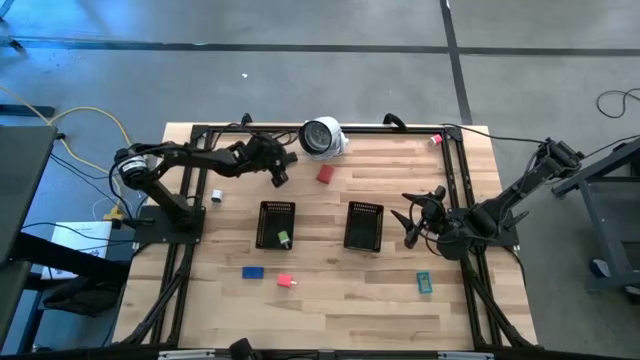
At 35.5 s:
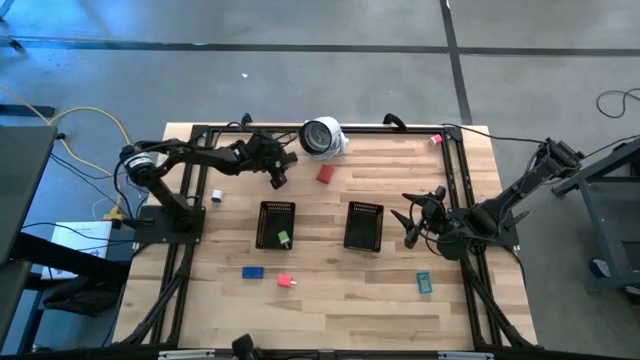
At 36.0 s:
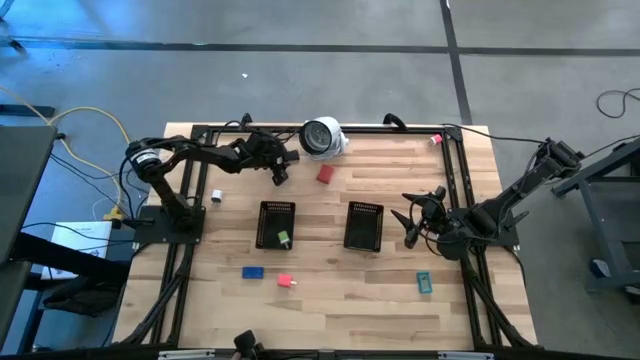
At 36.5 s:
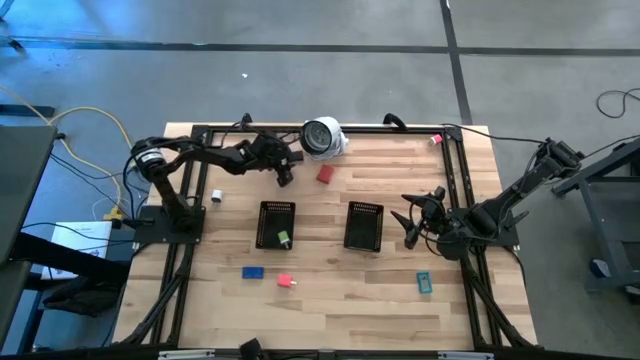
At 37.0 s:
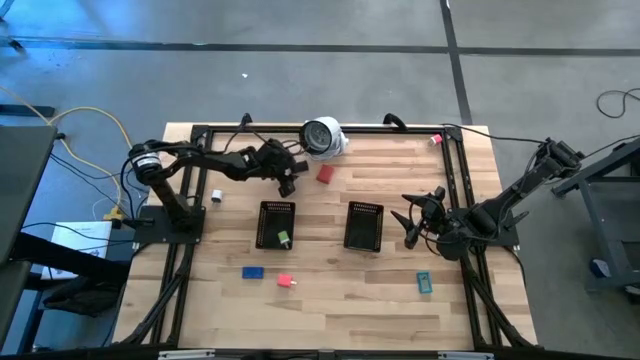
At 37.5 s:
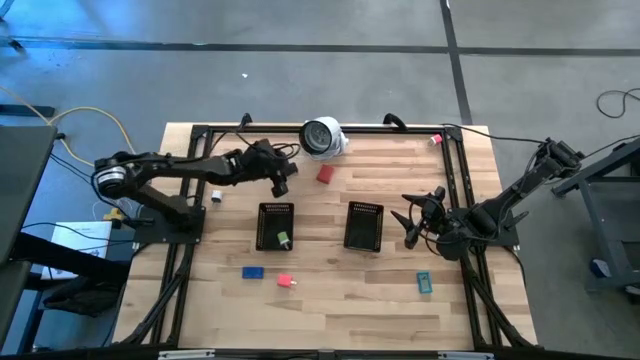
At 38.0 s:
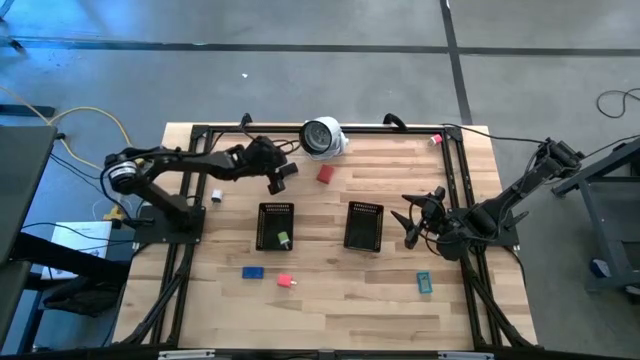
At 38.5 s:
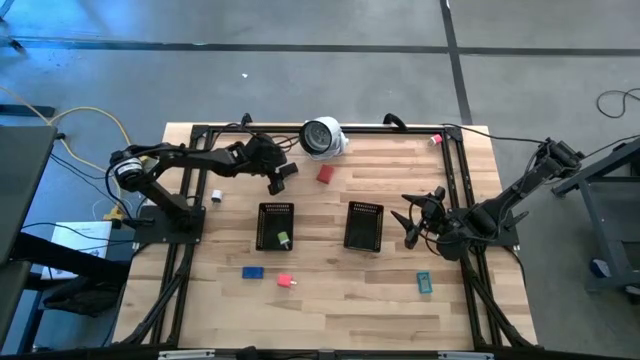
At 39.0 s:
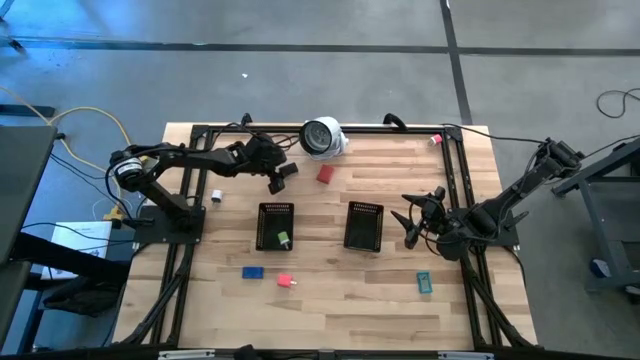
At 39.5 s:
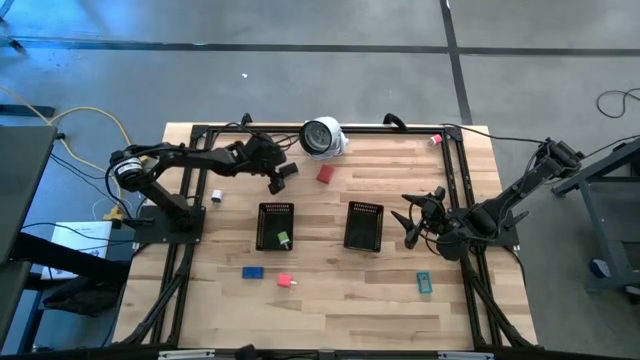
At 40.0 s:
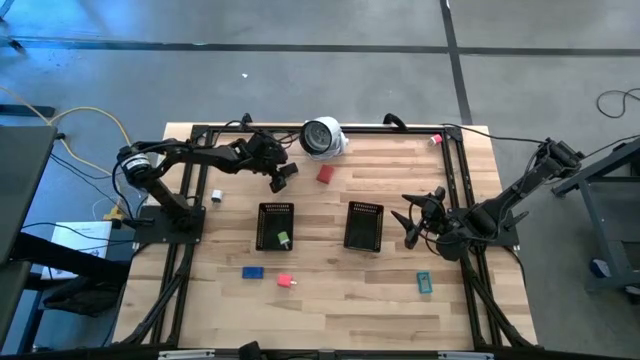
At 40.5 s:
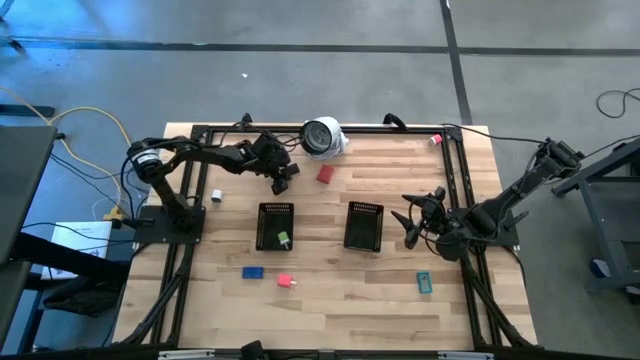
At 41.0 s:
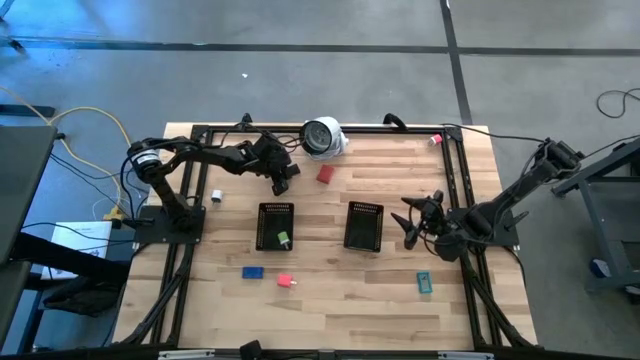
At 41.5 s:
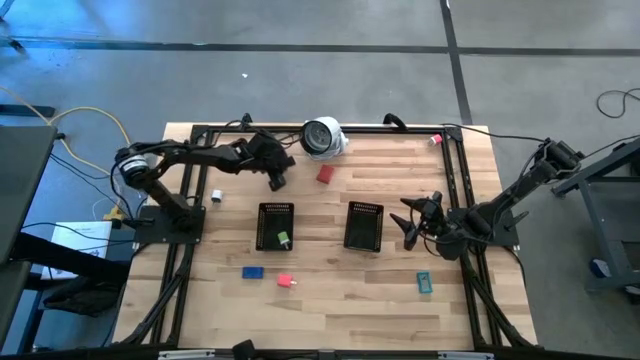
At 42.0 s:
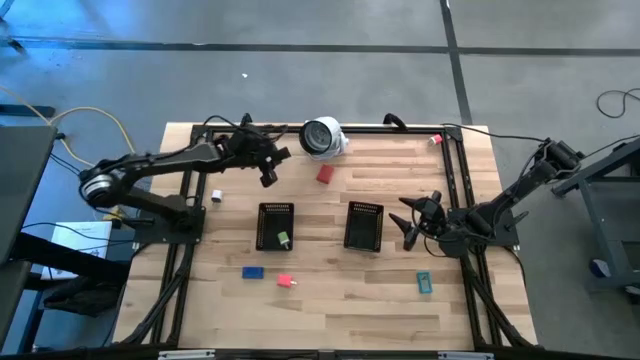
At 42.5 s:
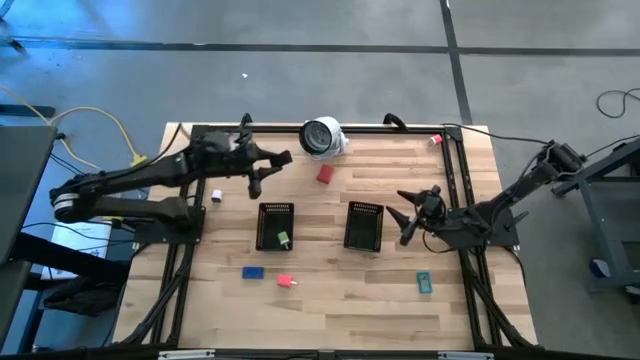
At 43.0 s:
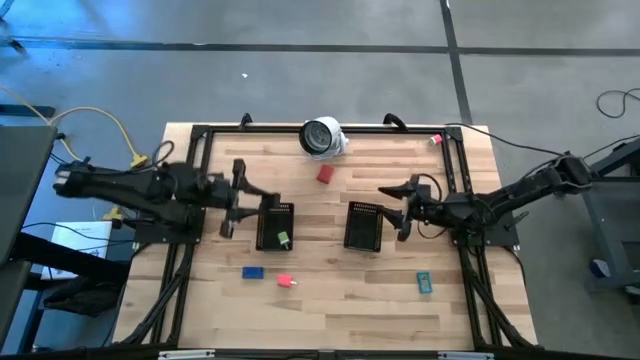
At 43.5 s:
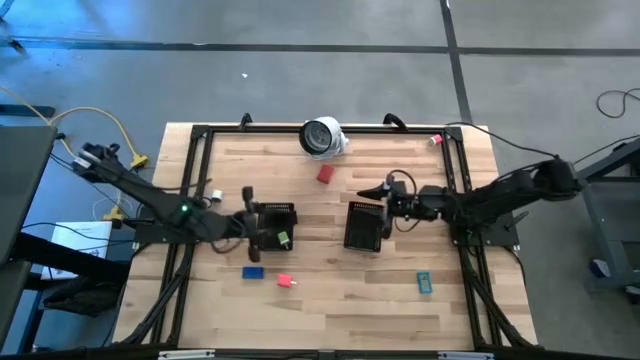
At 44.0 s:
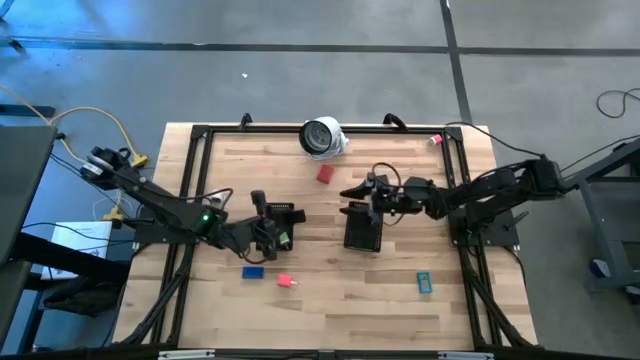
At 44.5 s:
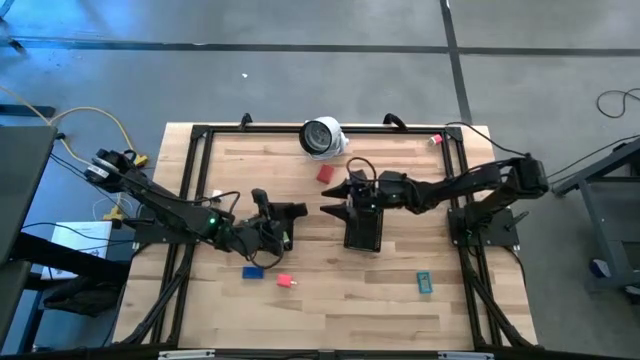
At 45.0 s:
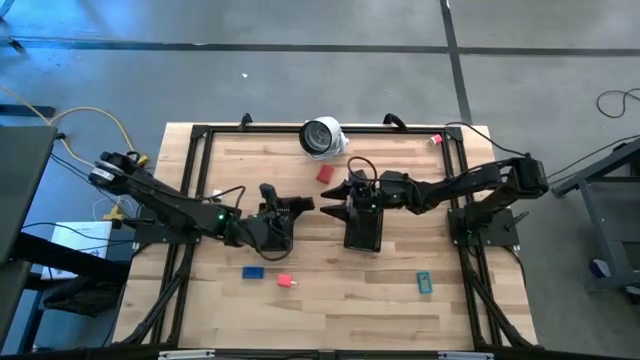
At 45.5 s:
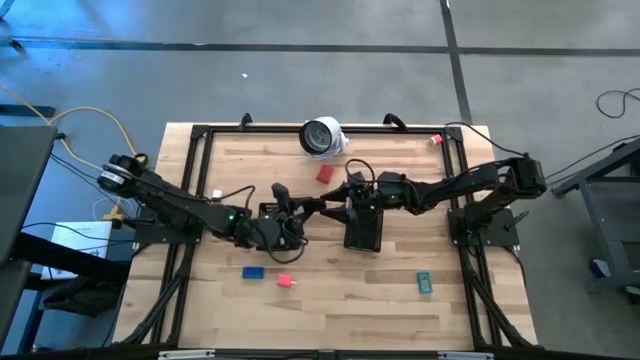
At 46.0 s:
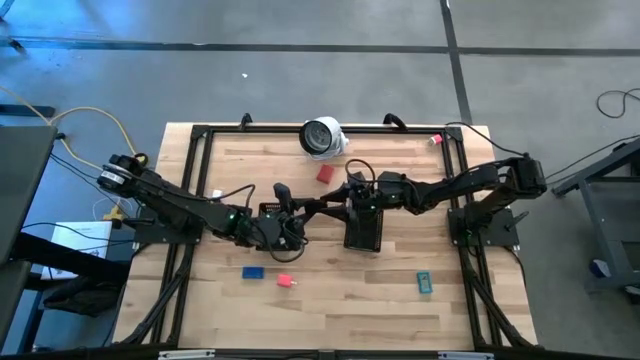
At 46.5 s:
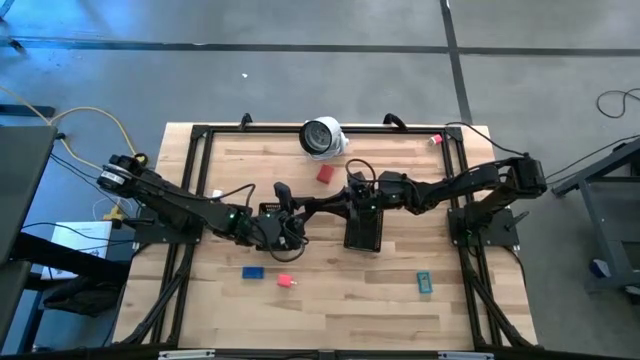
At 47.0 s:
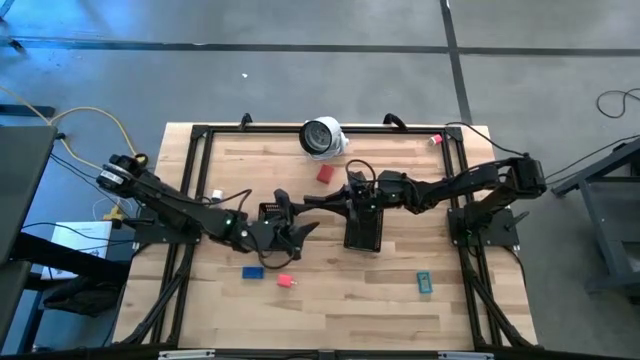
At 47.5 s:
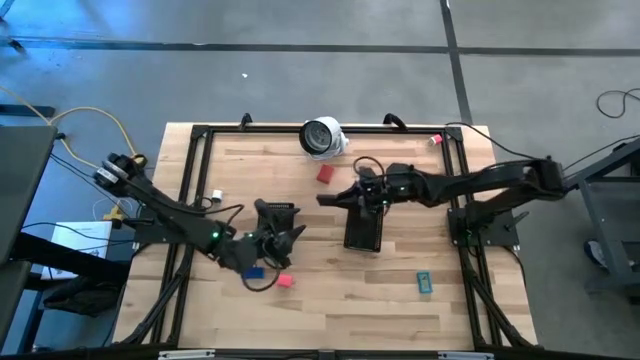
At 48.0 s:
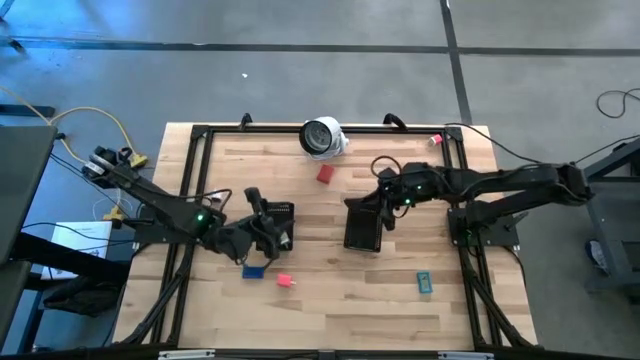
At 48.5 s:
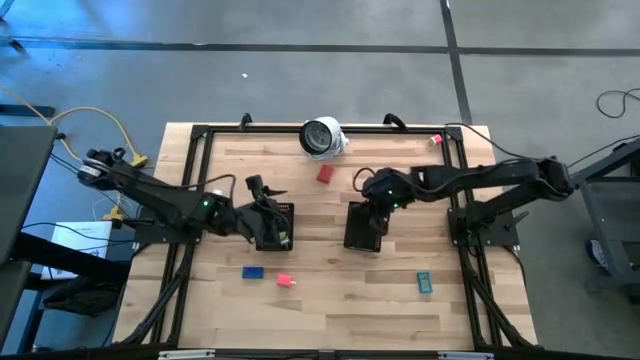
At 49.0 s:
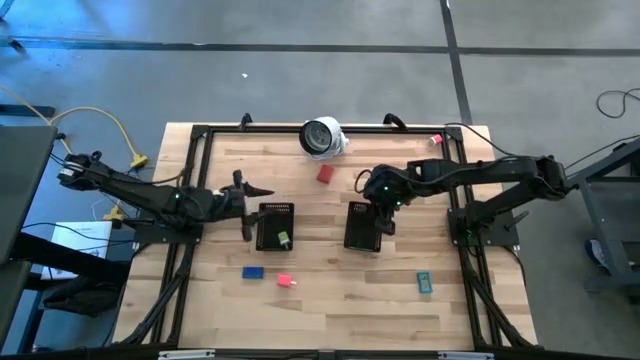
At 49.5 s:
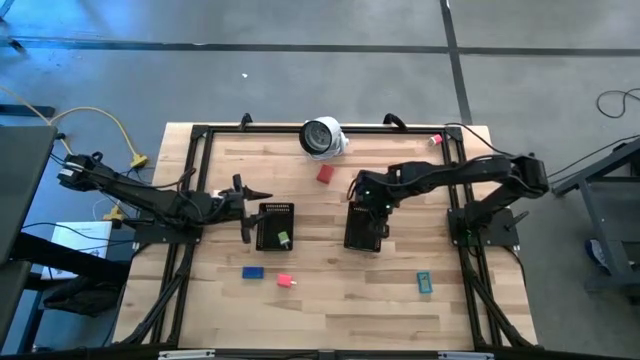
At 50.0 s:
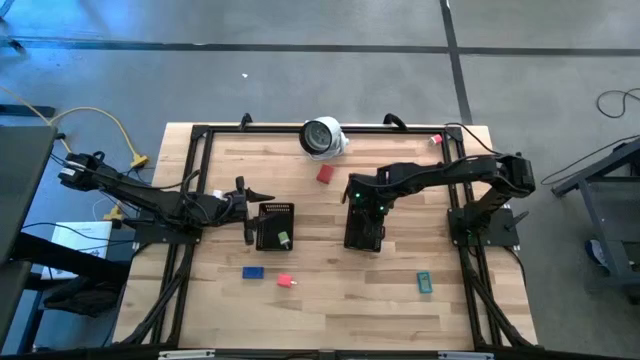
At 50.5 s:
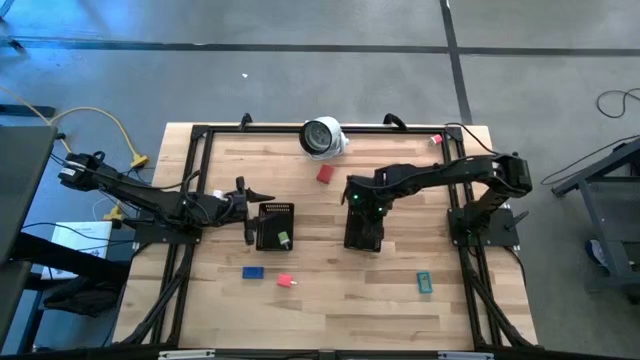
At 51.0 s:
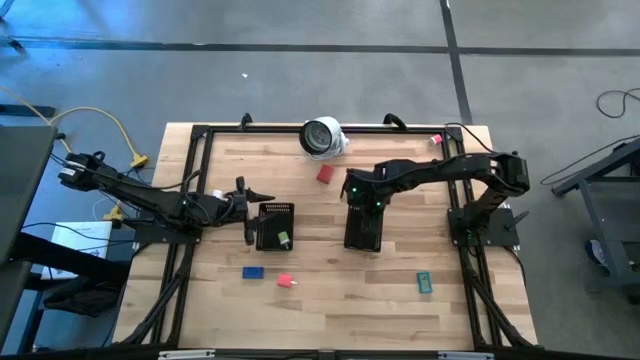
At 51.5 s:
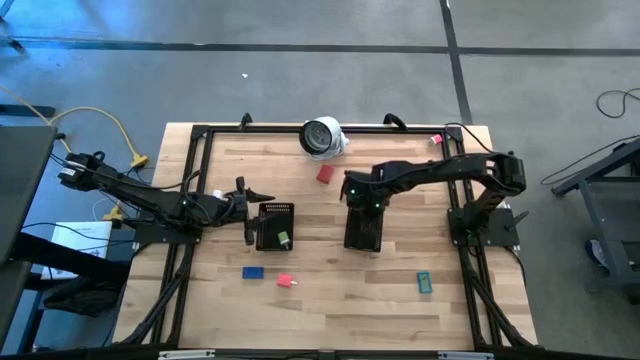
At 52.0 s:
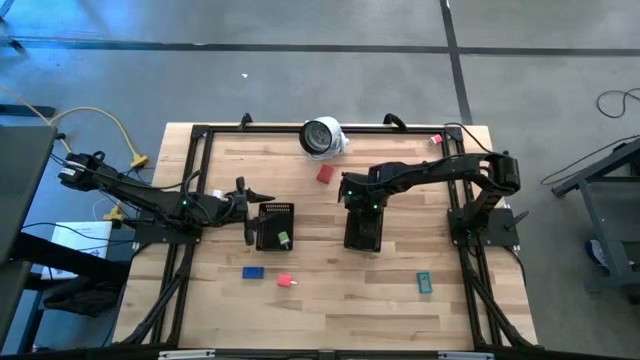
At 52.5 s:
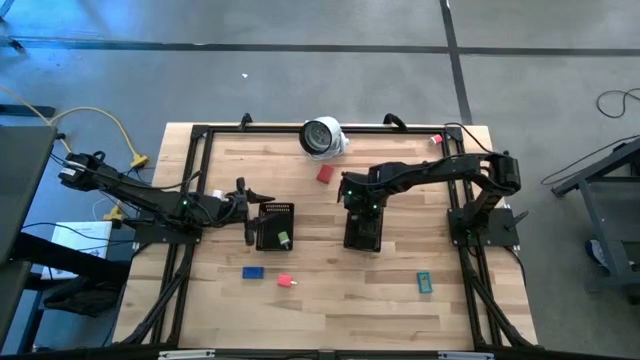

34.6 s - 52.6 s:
Task: Pick & Place Office items
Put the black digital clock into the right black bin

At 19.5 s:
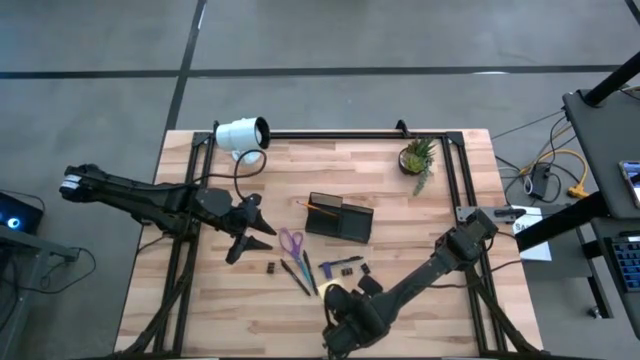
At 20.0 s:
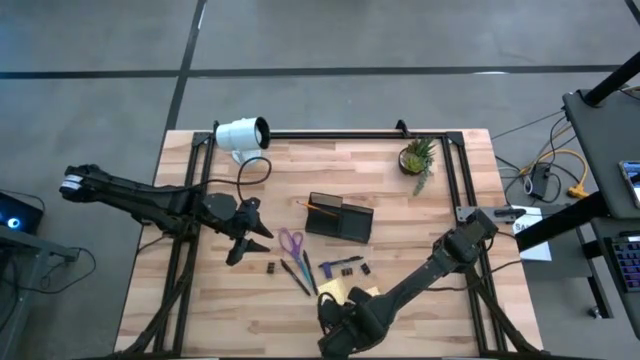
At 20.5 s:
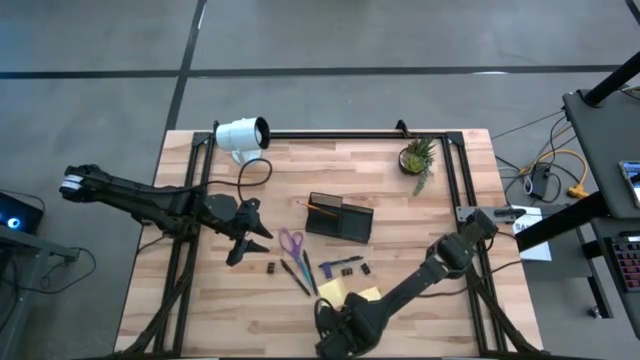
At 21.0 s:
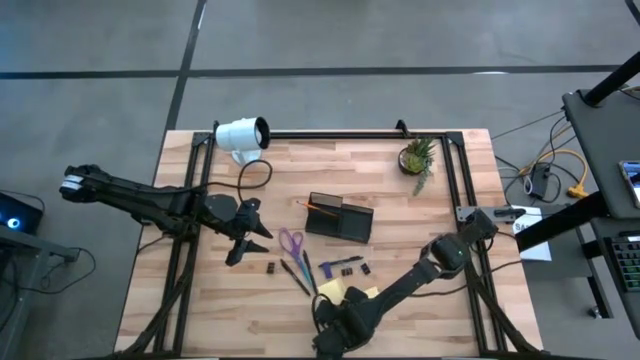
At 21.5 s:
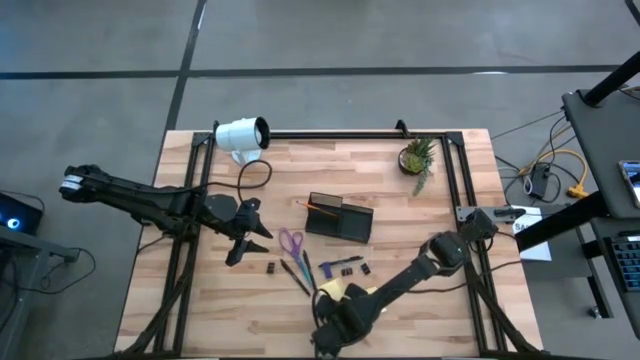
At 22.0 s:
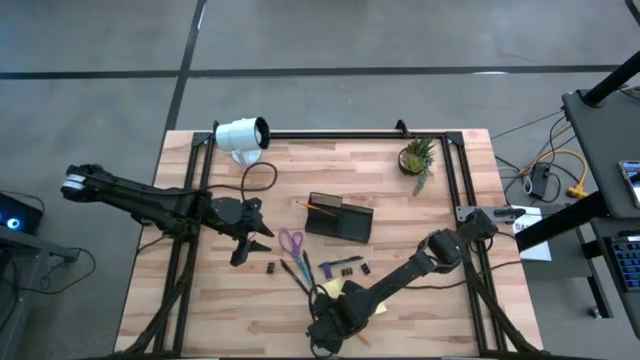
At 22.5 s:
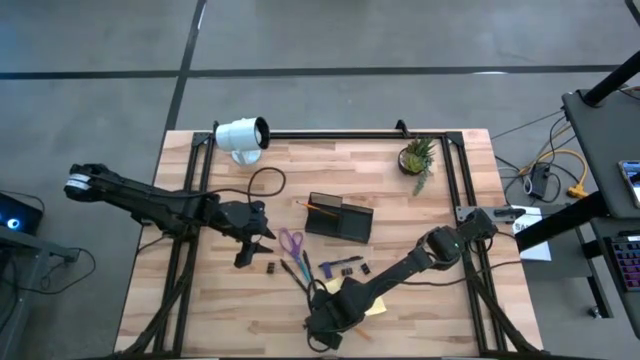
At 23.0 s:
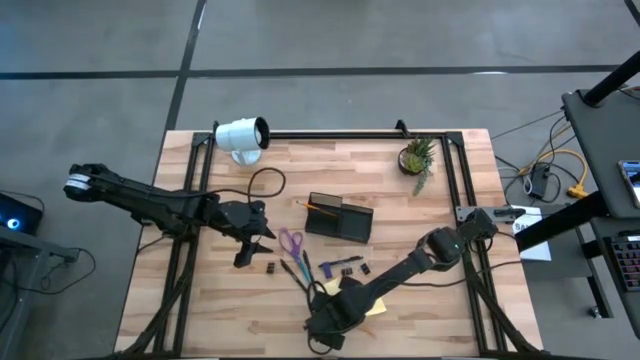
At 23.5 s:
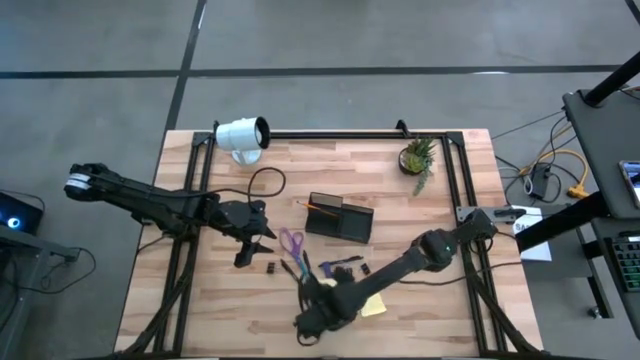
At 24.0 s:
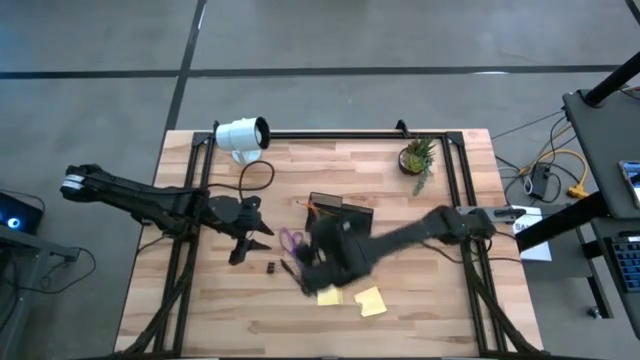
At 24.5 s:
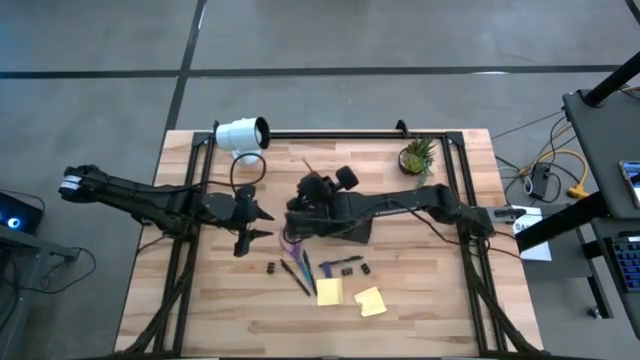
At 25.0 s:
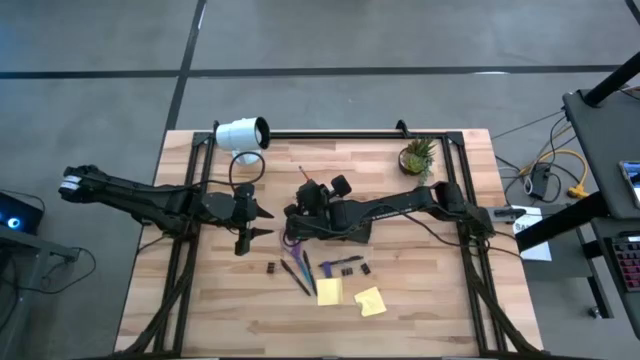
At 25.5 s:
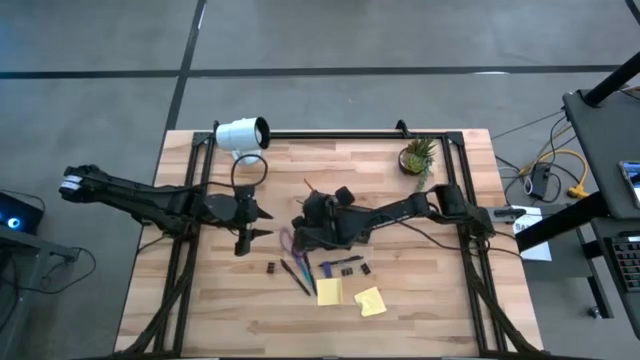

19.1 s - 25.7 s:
Task: Pick and place office supplies into organizer
Put the orange pencil into the black desk organizer
